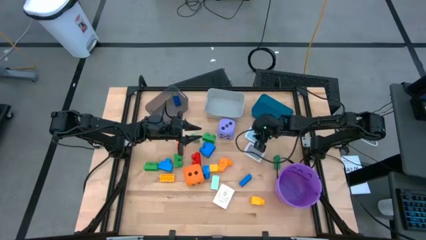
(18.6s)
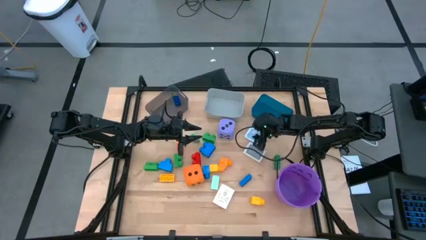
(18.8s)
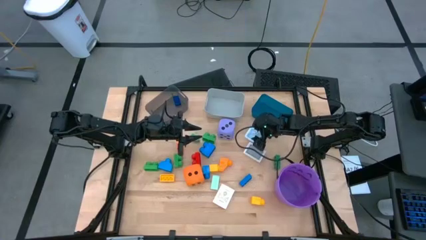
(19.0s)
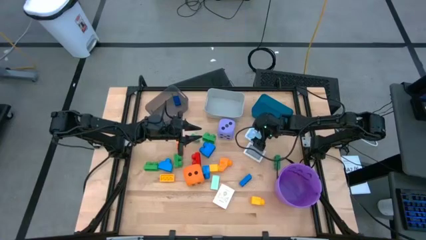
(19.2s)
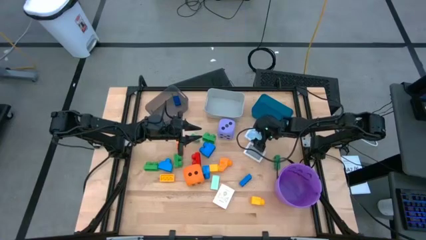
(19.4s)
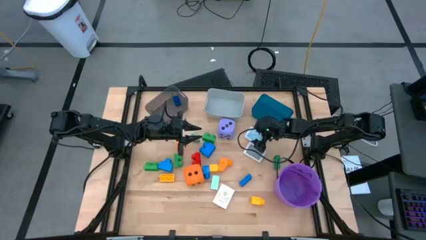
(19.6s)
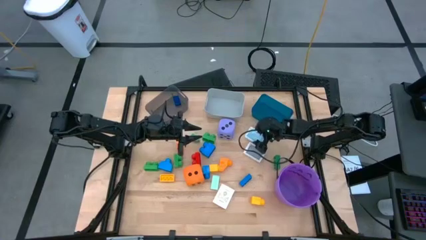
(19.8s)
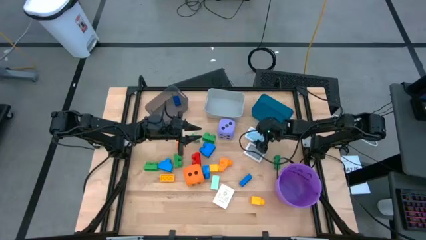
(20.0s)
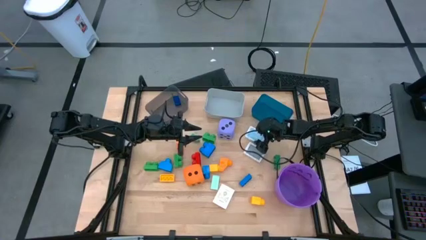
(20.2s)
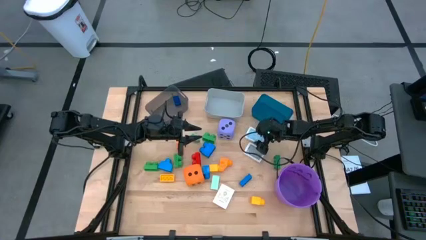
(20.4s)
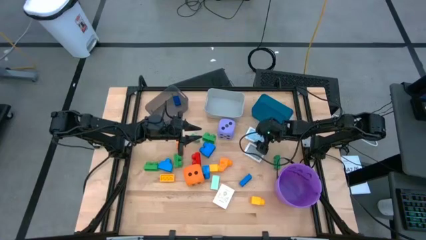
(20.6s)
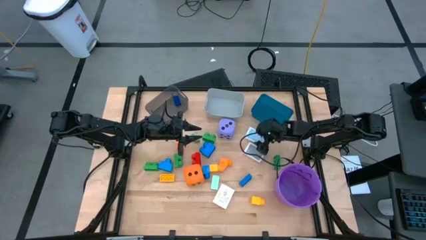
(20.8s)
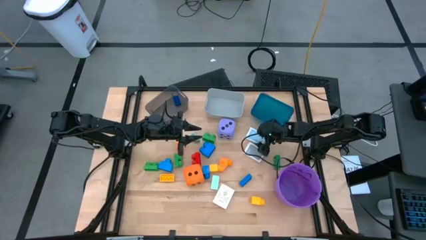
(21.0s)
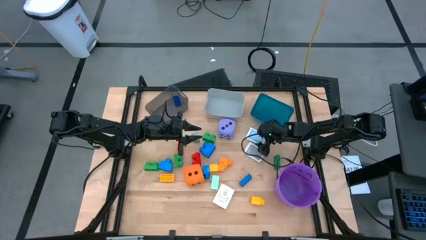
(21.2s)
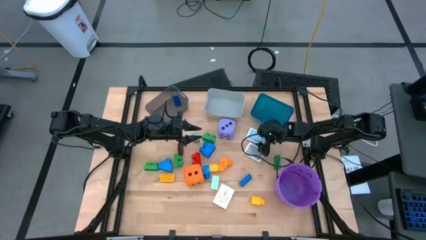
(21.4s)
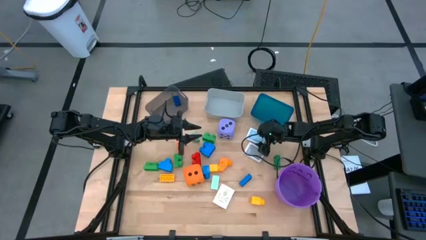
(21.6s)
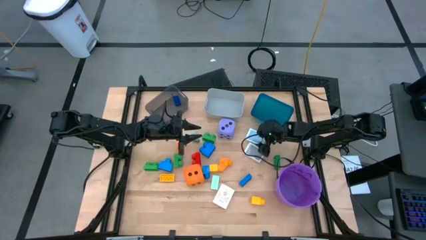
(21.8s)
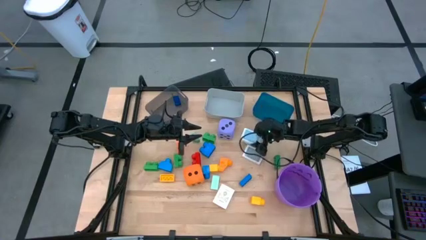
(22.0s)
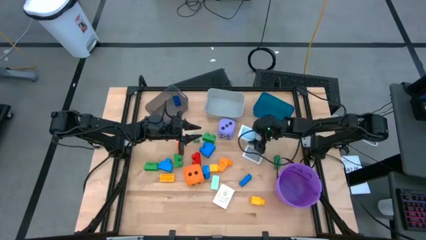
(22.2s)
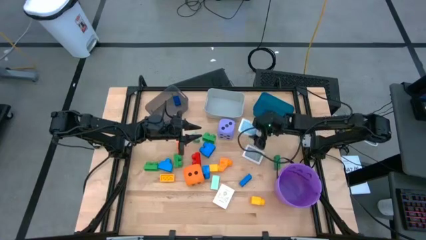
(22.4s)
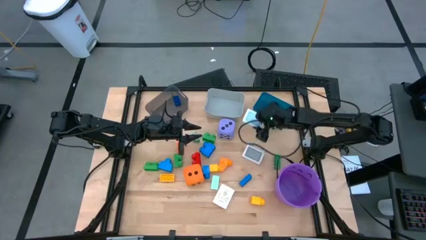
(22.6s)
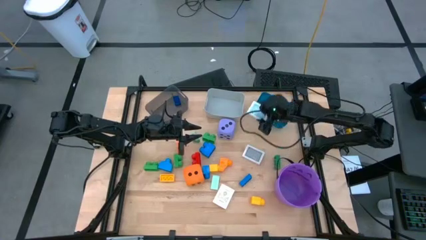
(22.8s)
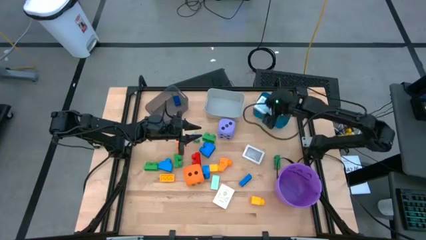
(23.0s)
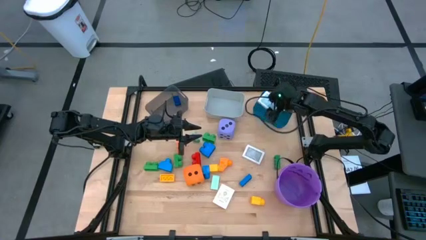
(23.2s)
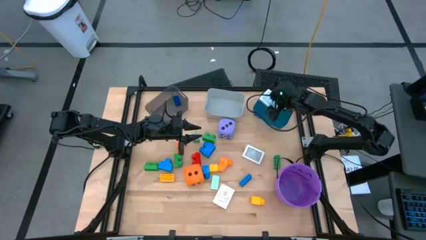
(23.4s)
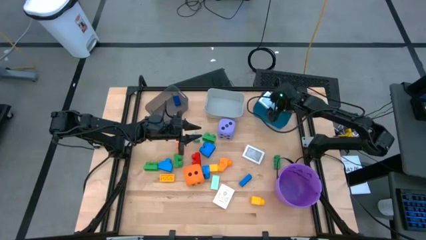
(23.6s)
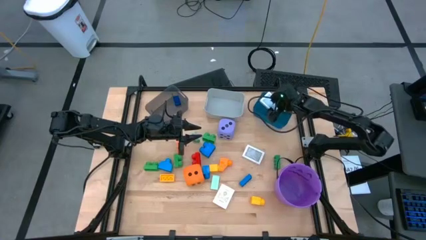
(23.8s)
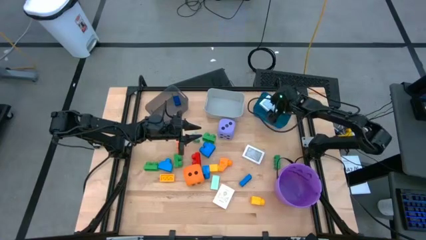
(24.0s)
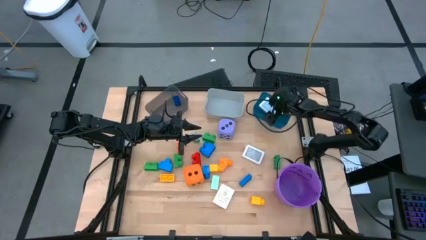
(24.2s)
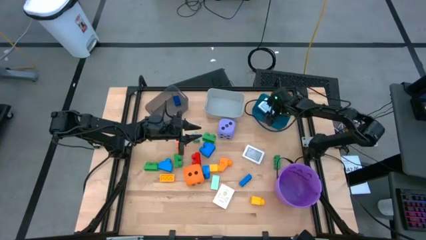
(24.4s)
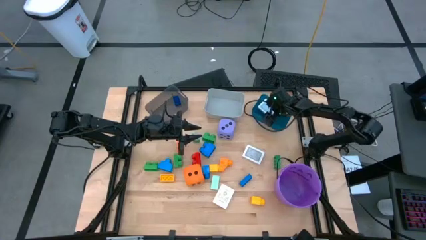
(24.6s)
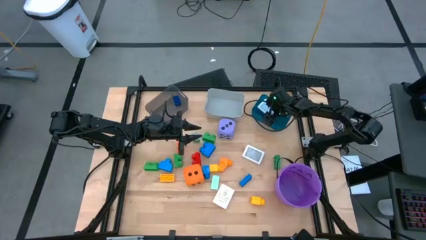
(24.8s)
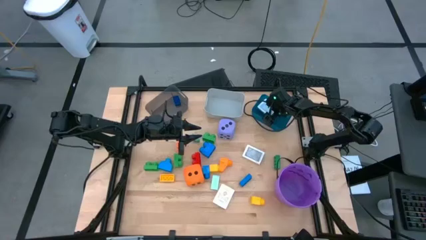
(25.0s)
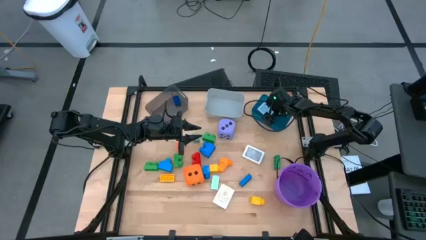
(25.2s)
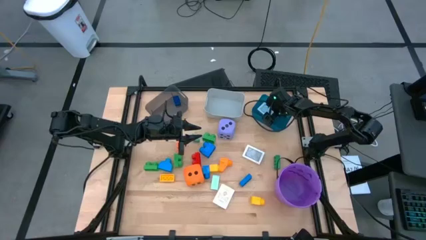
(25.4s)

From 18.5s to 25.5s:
Task: Pick & Place Toys
Put the blue deck of cards into the blue bin

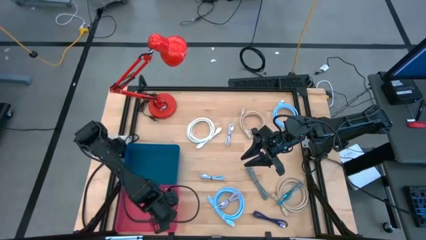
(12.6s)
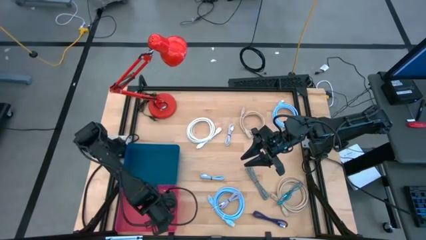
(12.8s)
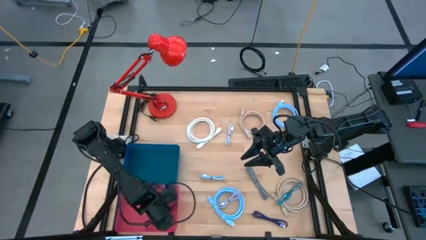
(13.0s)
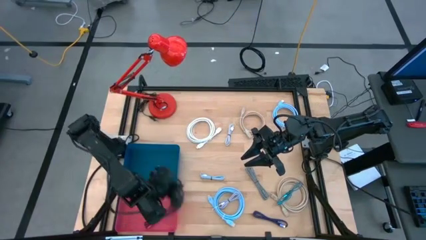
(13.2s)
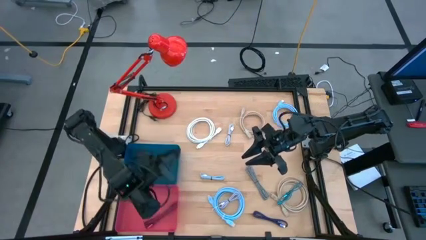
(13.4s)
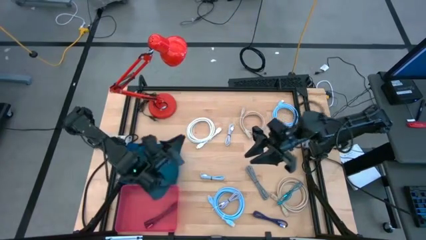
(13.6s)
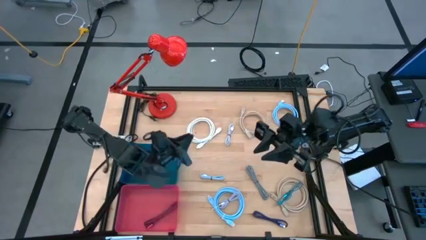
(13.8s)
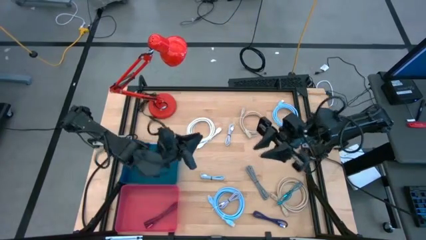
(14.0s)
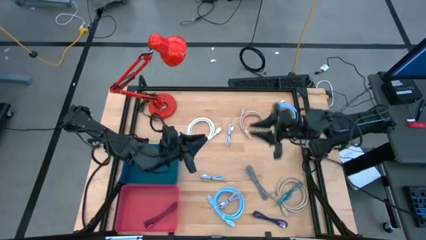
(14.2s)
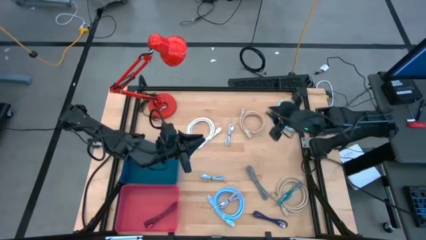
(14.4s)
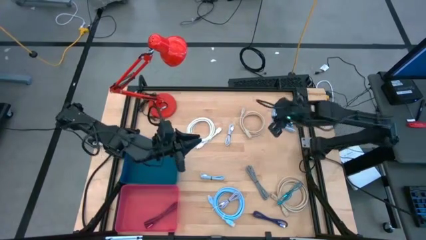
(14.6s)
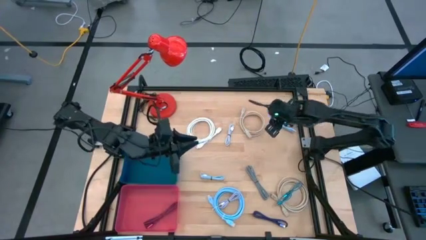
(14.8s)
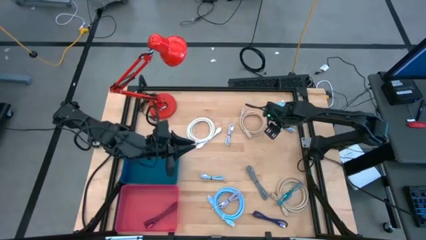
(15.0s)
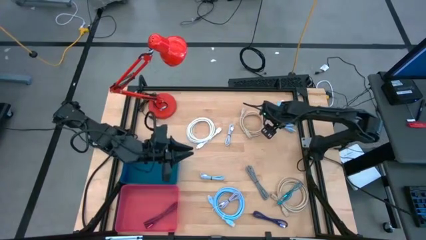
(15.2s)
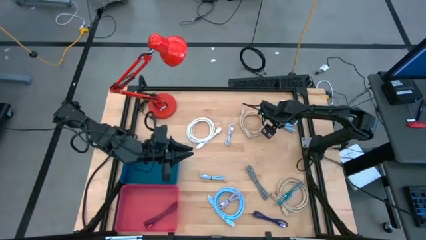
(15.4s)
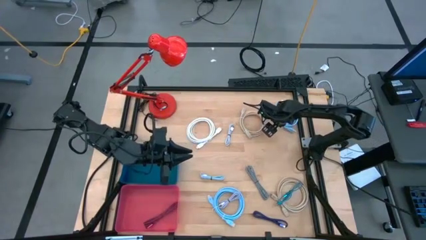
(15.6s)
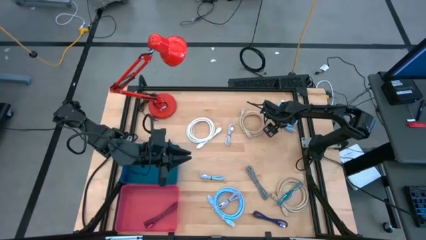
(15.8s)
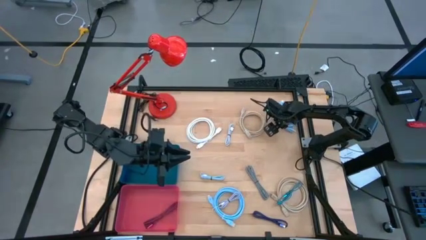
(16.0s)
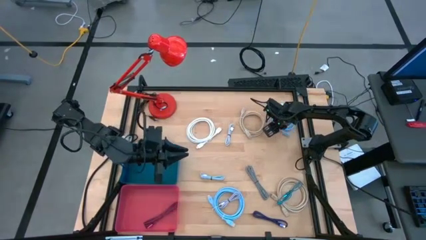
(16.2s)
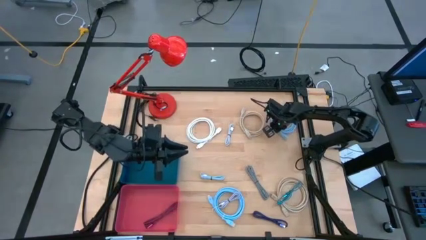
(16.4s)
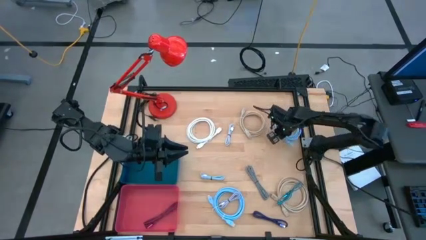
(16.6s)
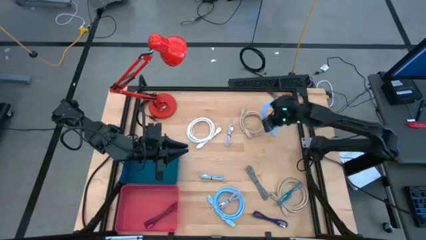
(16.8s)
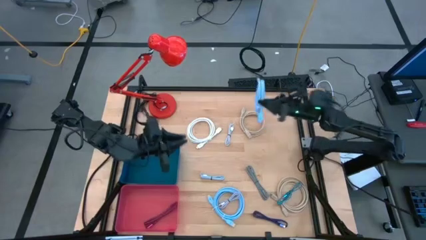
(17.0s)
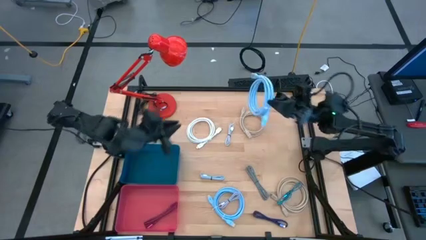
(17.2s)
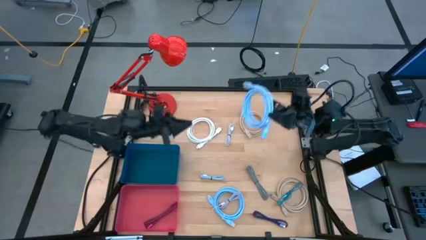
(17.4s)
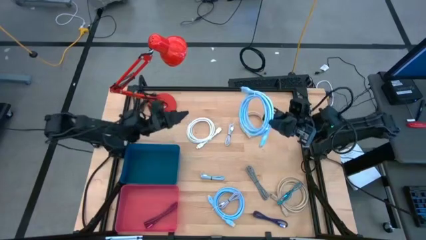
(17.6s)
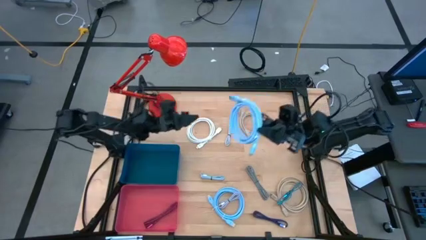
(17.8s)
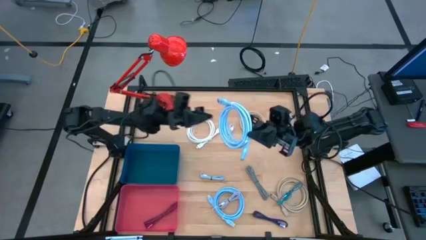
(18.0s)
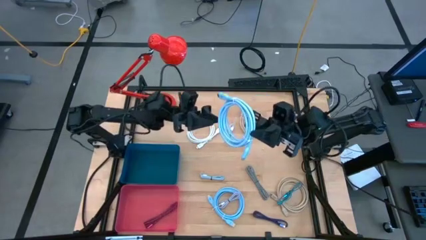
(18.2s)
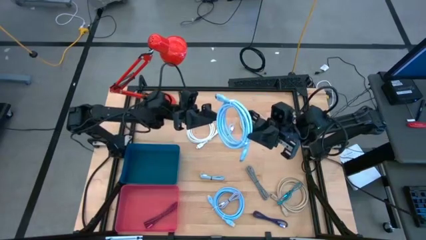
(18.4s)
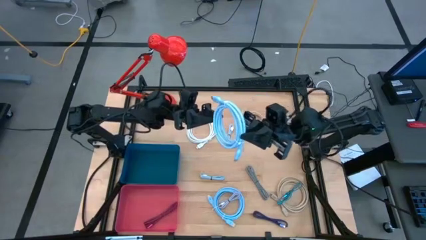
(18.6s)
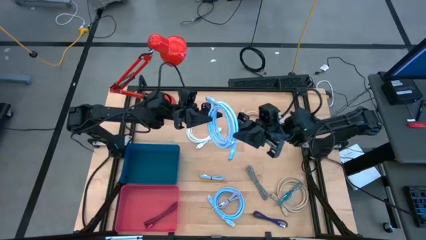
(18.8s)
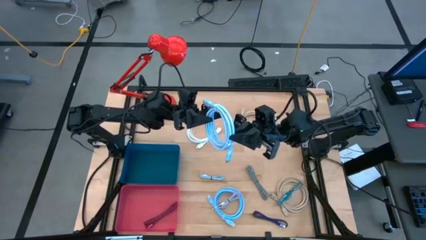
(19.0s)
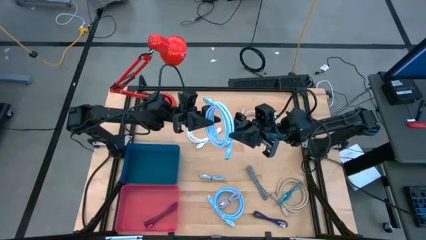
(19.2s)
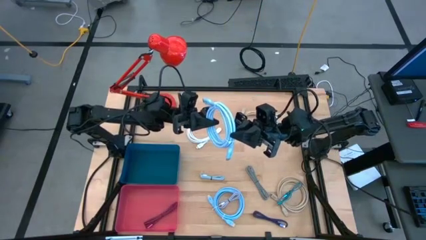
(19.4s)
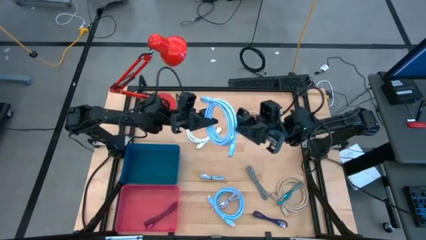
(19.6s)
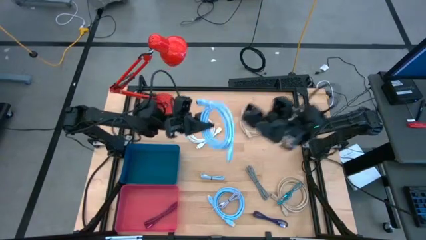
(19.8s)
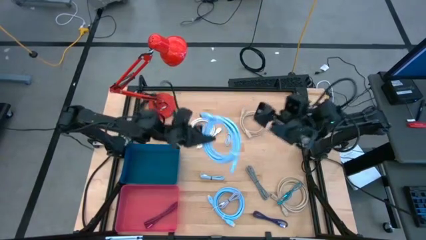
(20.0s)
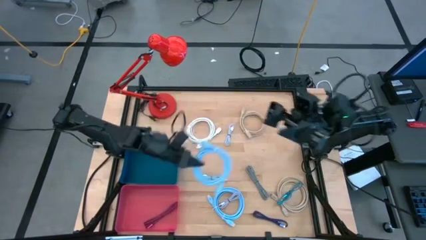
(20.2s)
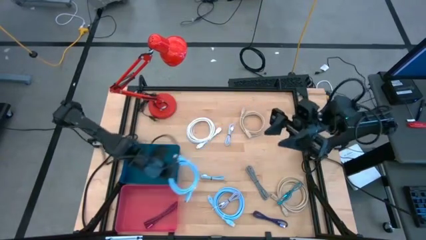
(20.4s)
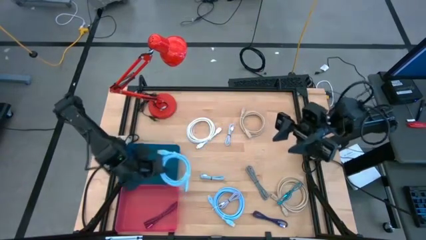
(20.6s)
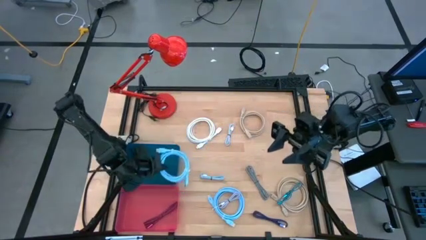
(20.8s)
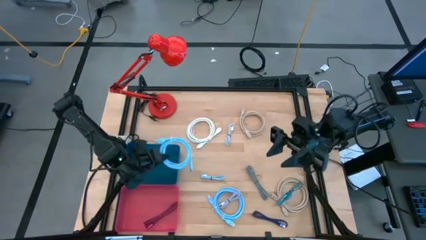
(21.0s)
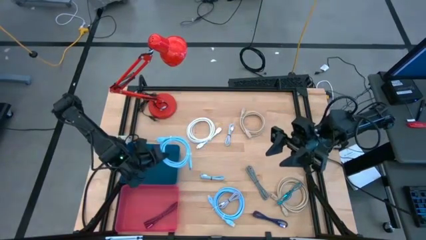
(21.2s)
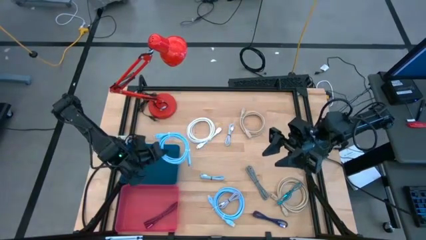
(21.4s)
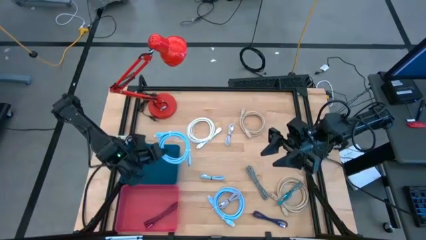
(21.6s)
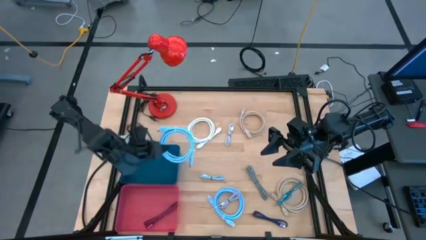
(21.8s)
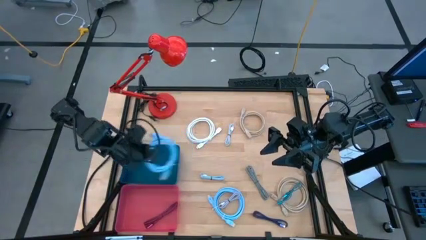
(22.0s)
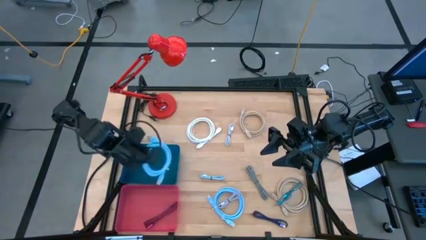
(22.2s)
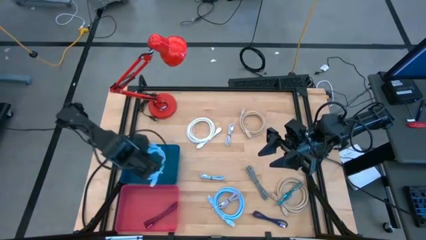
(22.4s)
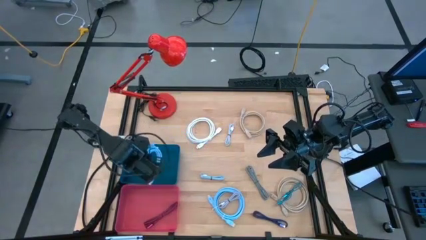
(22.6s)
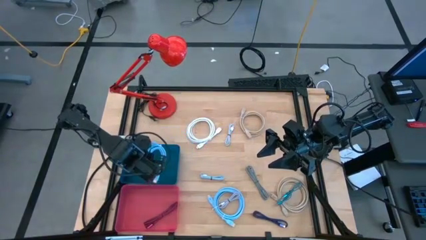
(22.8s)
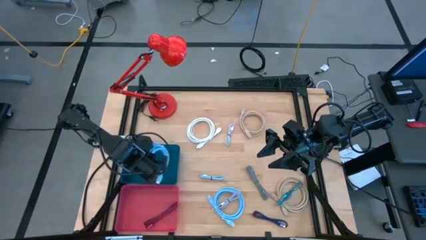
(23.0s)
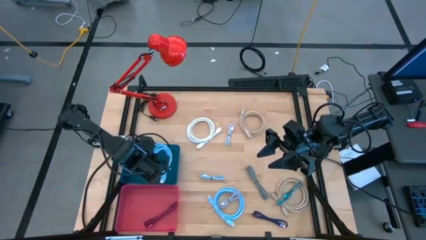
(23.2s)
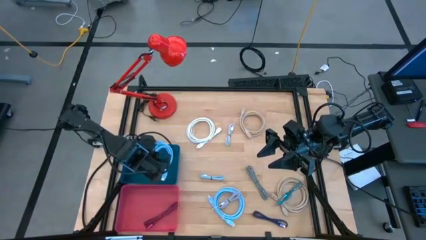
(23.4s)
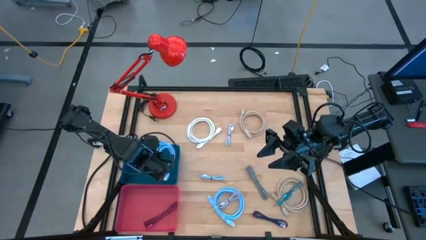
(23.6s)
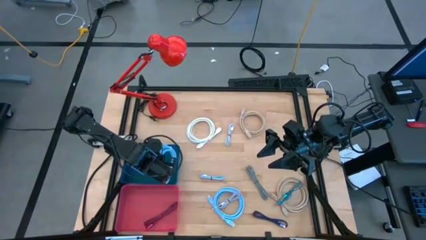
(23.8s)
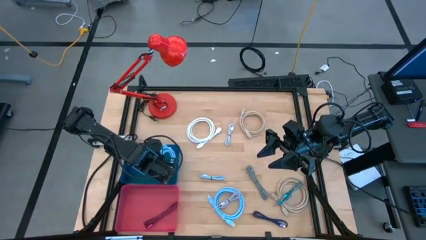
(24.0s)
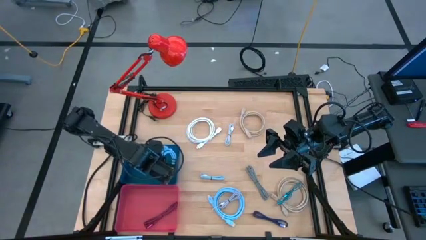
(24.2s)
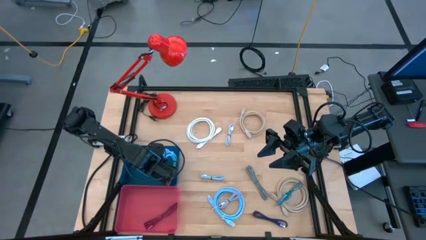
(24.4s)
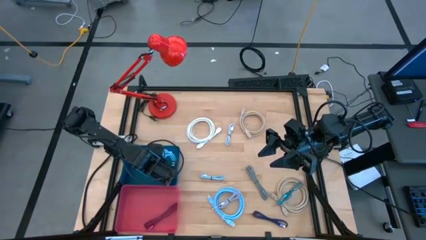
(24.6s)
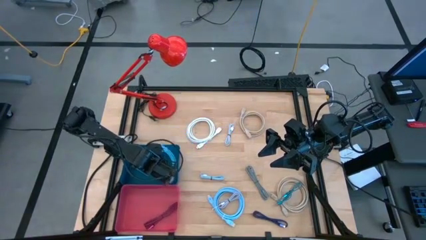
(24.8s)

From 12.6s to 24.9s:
Task: Pick & Place USB Port
Put the top blue HDMI cable into the blue bin
